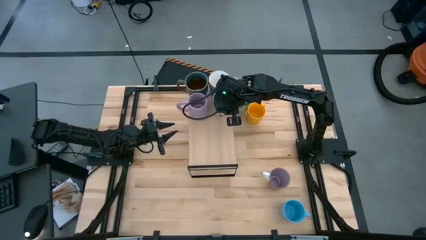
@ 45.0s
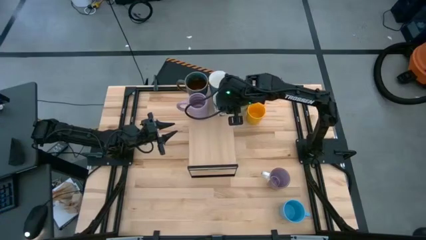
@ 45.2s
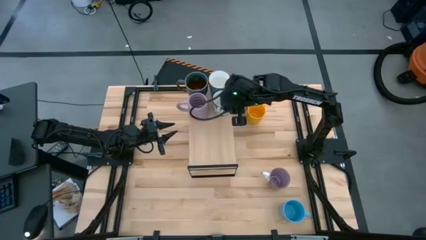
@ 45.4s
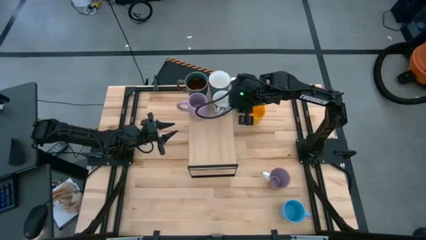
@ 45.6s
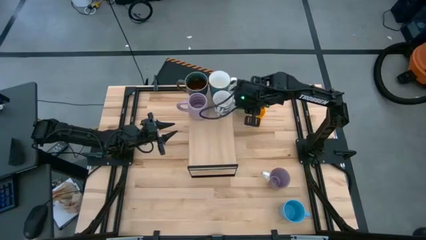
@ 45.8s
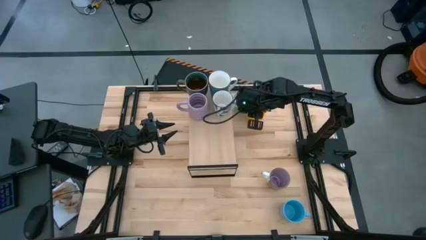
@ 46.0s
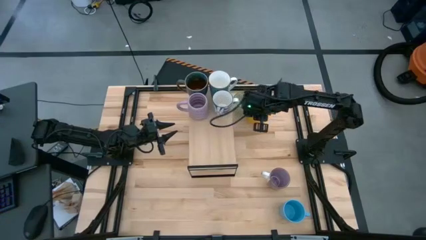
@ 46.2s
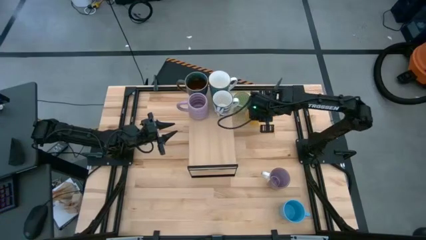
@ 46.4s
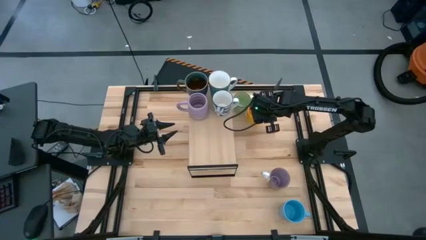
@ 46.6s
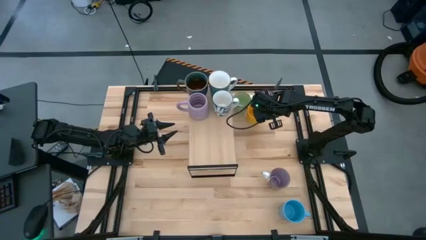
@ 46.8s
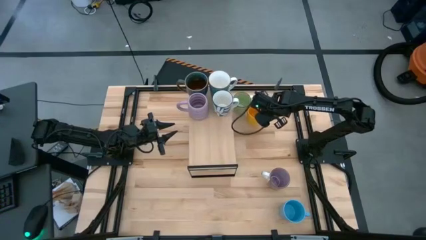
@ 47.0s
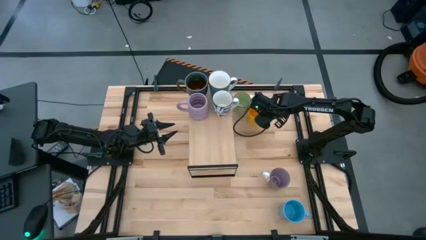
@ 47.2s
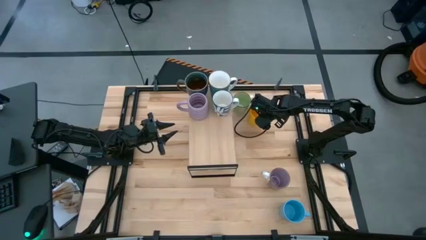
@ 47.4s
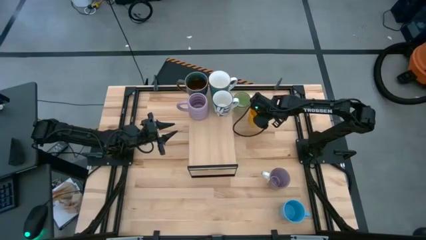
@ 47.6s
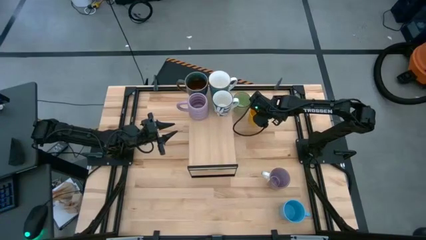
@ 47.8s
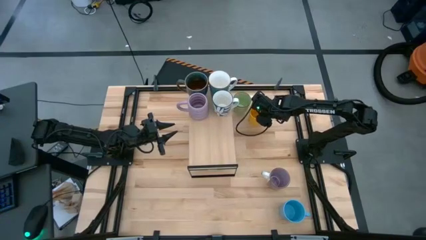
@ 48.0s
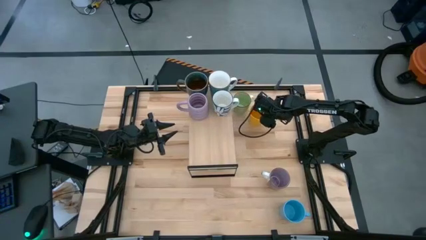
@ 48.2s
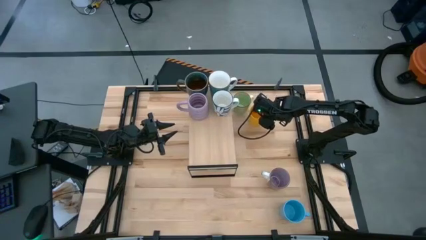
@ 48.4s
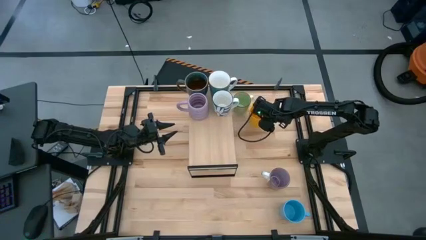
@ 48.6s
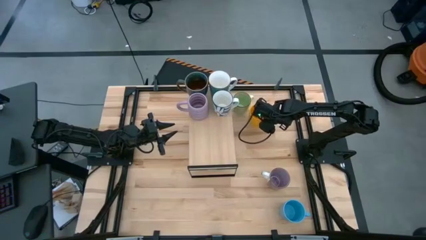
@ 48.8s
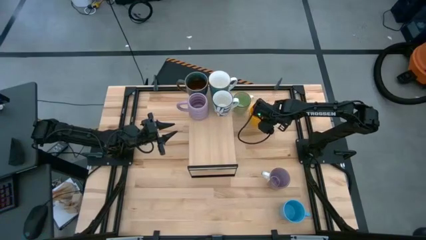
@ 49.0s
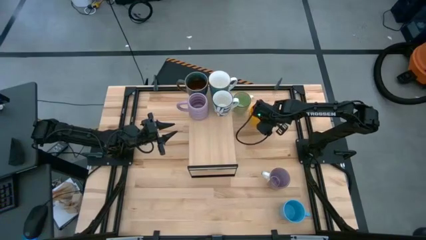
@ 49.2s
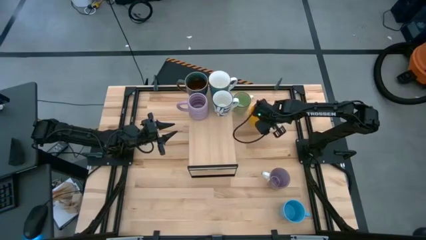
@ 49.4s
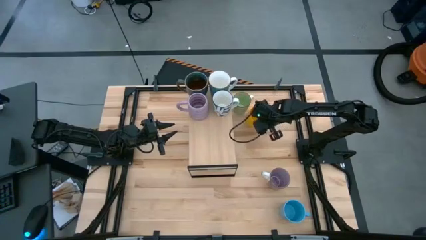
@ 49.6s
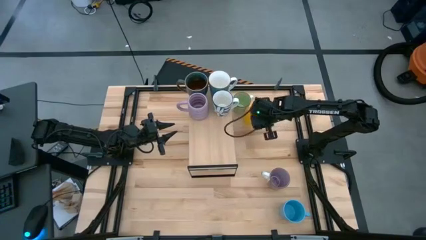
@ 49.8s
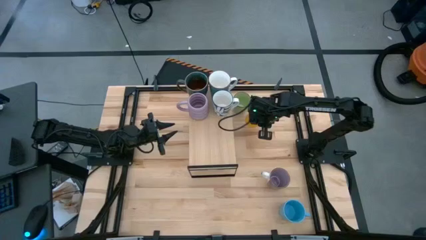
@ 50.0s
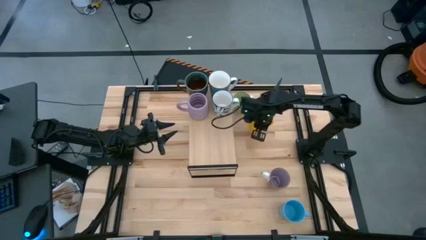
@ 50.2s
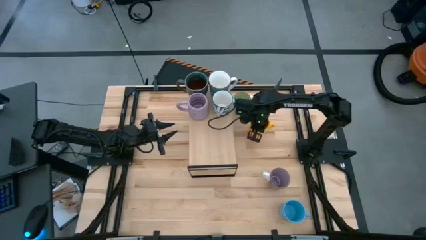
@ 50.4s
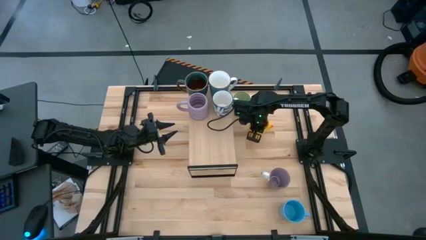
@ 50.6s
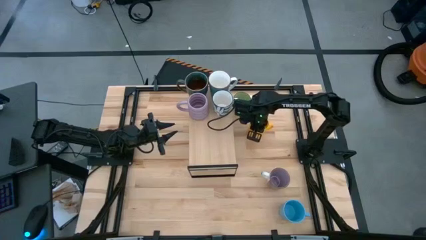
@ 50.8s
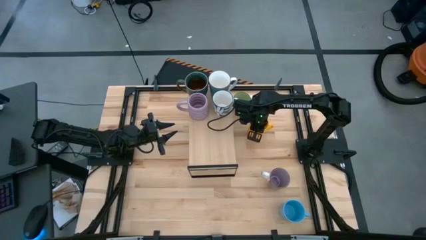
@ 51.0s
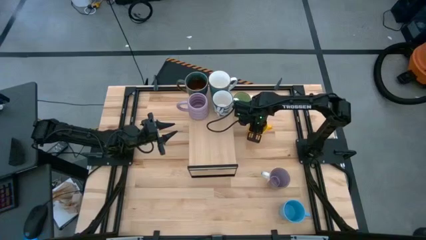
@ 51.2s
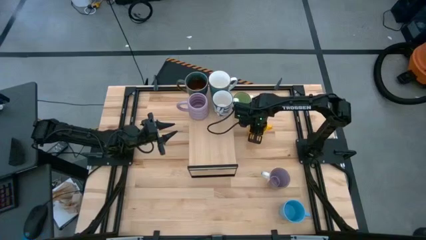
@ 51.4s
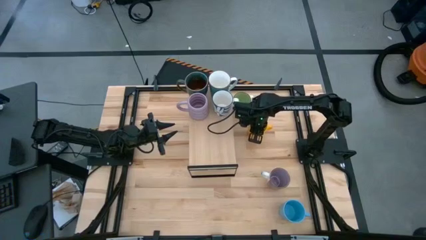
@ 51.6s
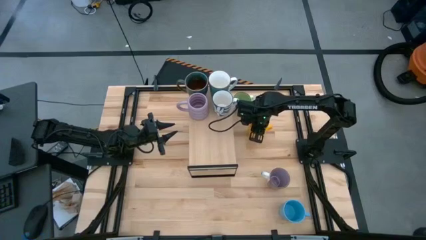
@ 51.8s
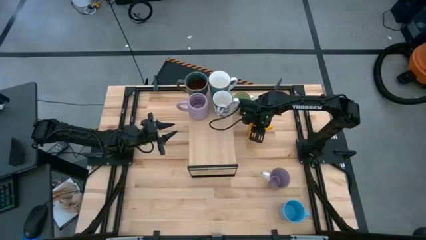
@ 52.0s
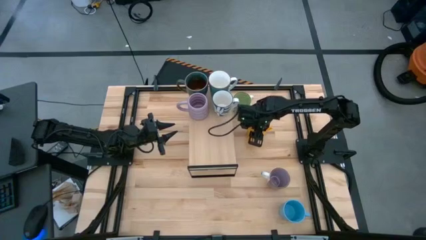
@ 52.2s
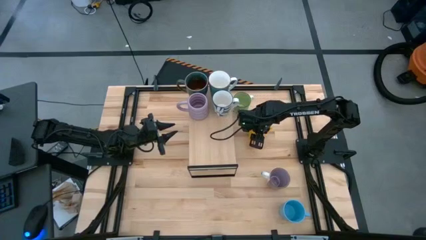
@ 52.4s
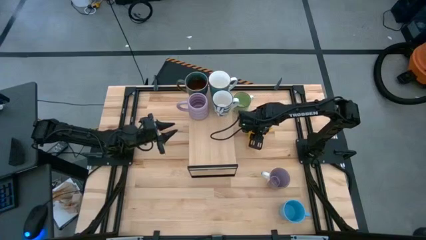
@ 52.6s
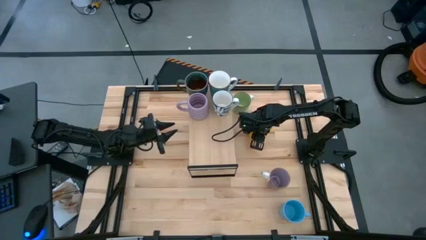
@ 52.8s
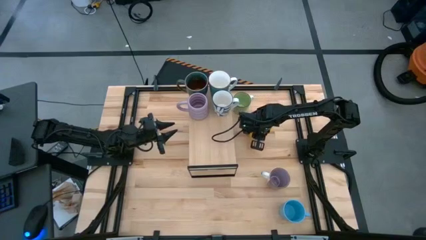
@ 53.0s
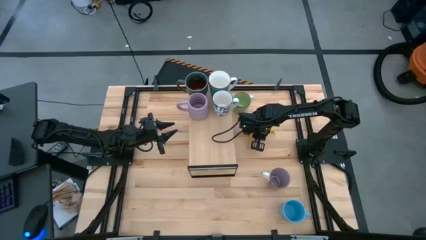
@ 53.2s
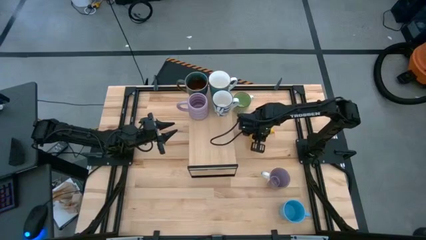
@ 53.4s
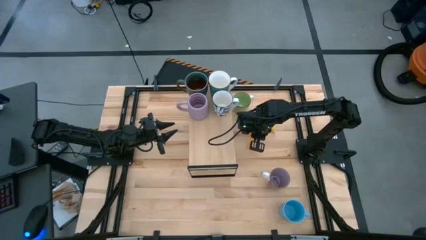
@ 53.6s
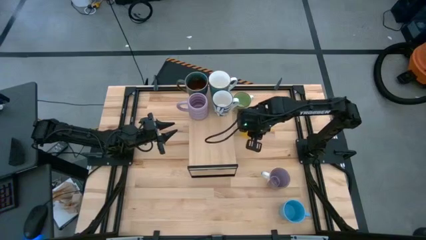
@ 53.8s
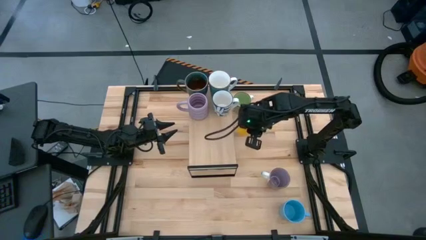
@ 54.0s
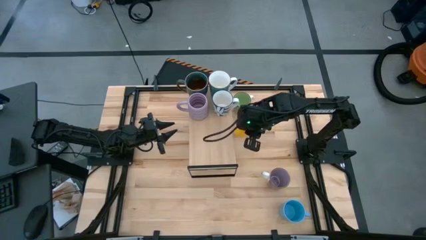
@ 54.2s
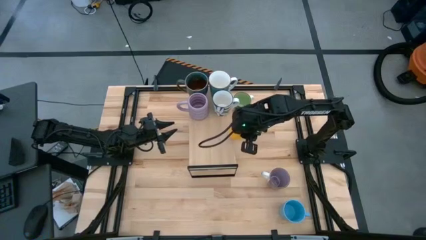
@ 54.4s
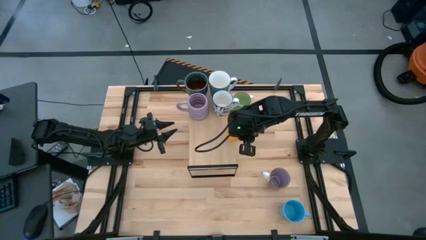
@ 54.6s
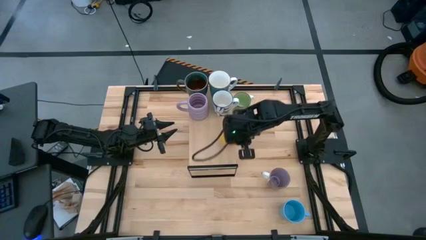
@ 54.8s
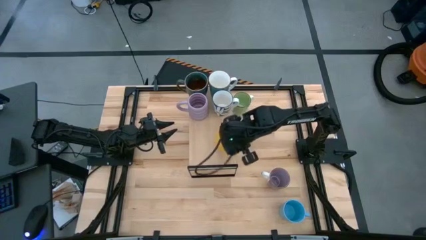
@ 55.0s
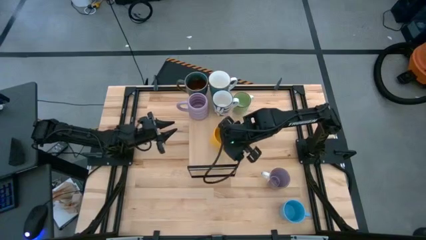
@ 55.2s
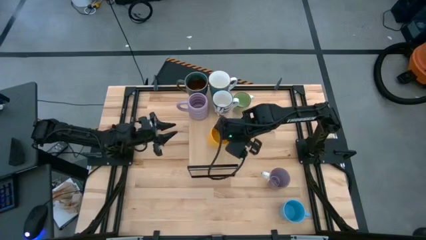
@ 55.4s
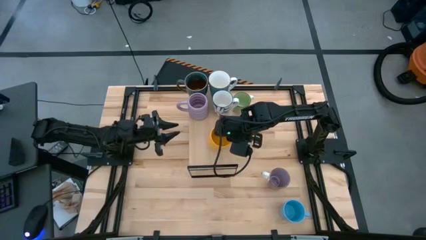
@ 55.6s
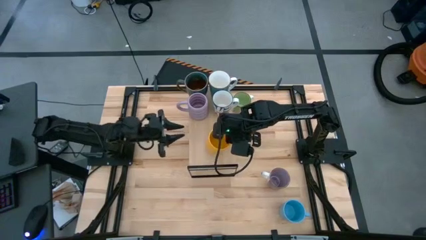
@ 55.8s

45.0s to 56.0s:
Task: Place coffee mugs
Put the yellow mug on the shelf
